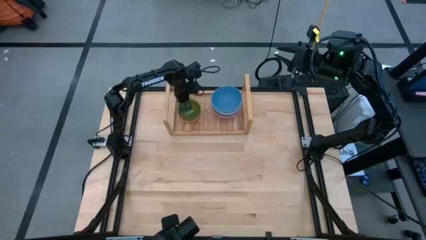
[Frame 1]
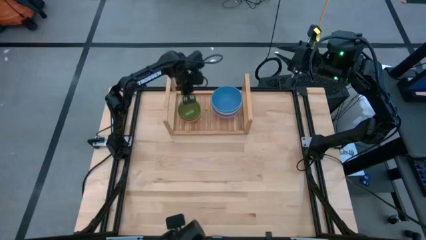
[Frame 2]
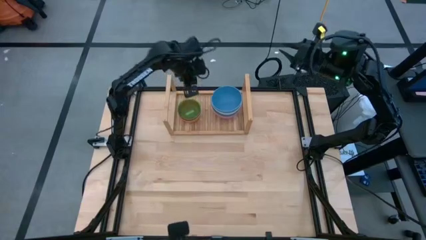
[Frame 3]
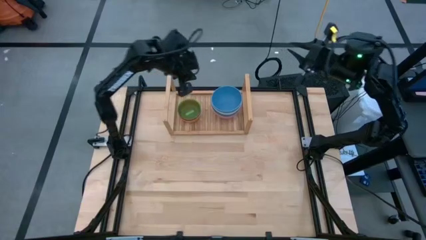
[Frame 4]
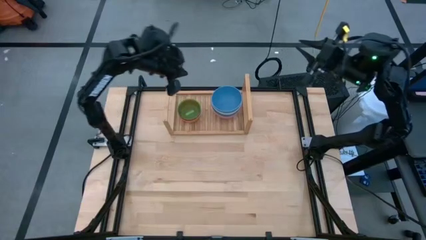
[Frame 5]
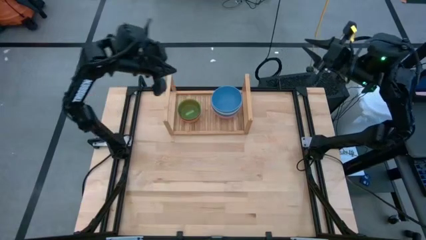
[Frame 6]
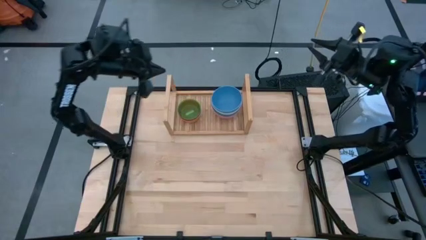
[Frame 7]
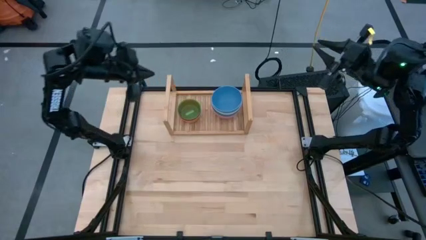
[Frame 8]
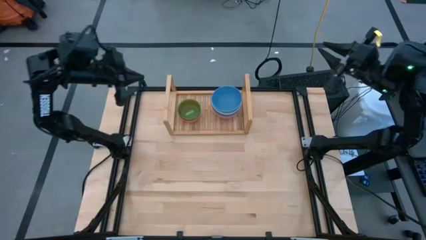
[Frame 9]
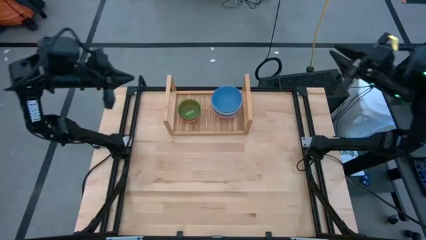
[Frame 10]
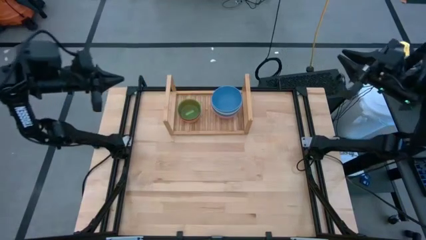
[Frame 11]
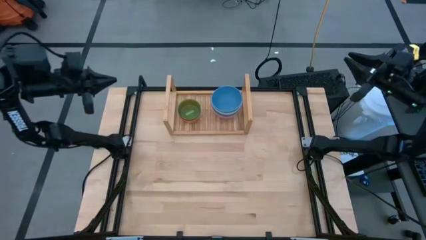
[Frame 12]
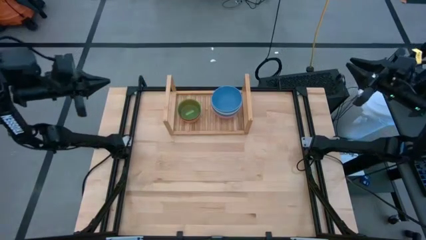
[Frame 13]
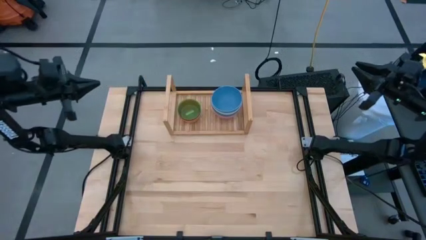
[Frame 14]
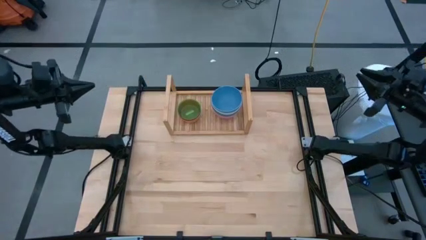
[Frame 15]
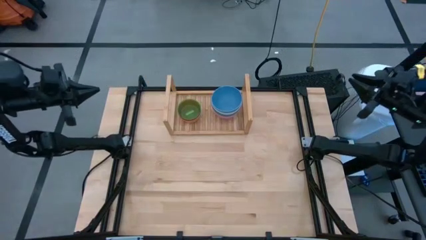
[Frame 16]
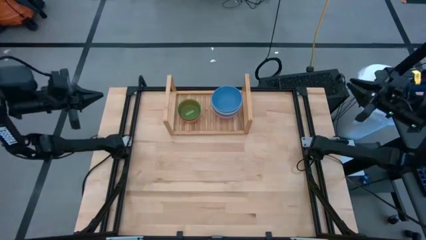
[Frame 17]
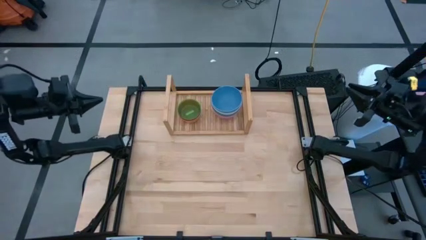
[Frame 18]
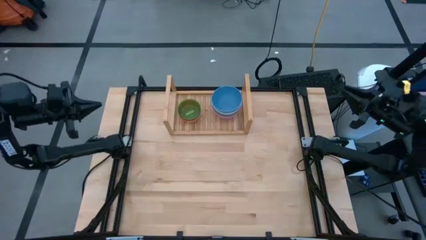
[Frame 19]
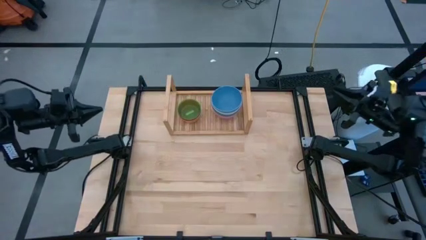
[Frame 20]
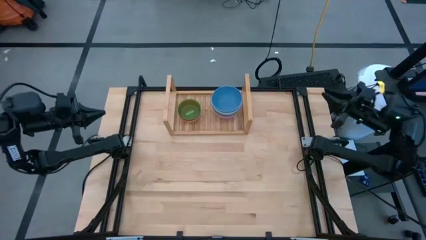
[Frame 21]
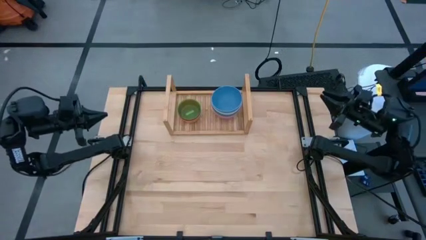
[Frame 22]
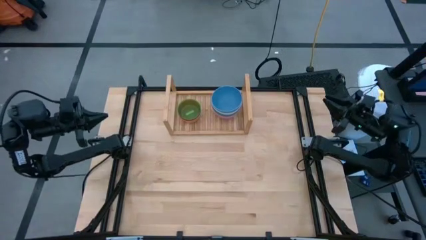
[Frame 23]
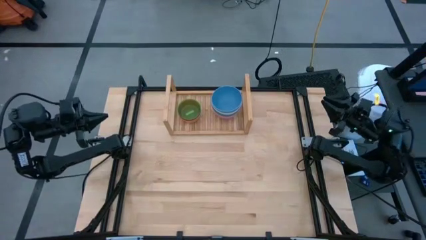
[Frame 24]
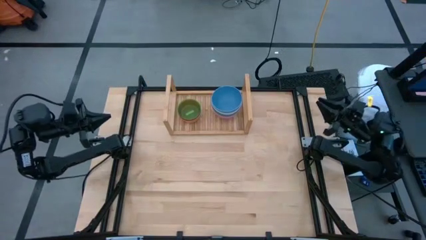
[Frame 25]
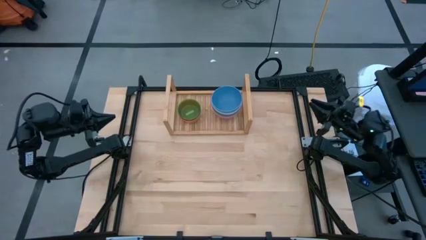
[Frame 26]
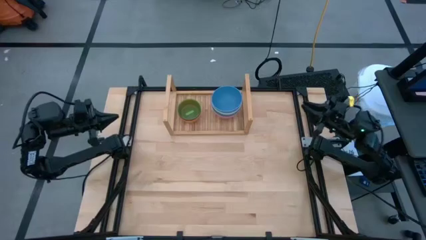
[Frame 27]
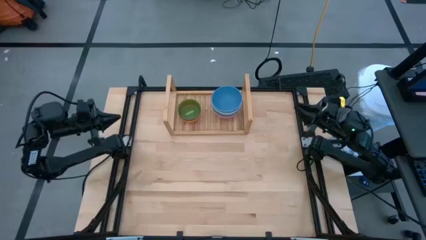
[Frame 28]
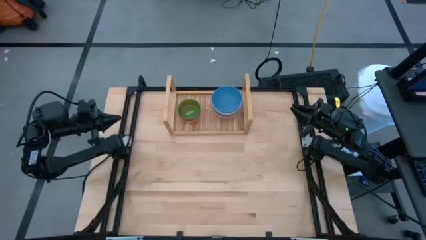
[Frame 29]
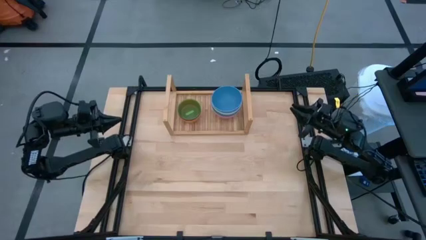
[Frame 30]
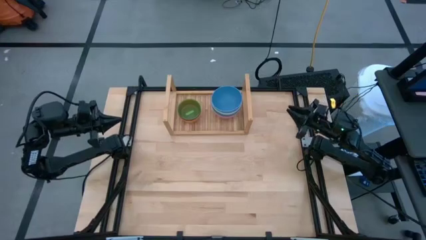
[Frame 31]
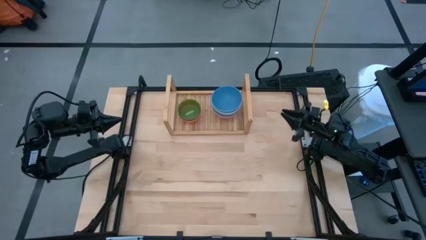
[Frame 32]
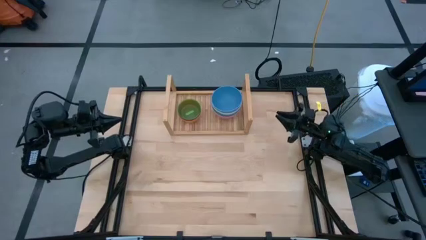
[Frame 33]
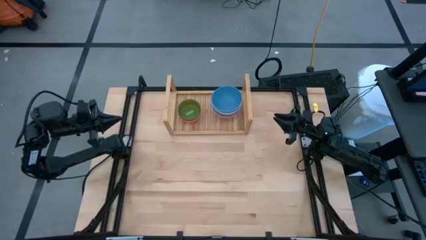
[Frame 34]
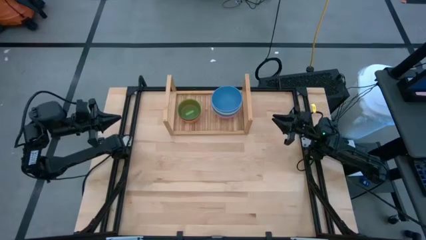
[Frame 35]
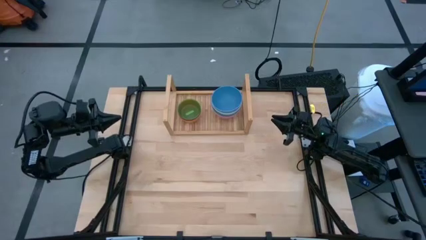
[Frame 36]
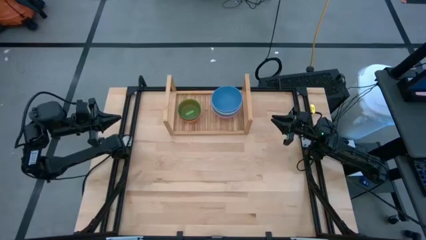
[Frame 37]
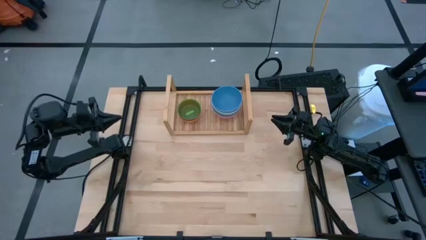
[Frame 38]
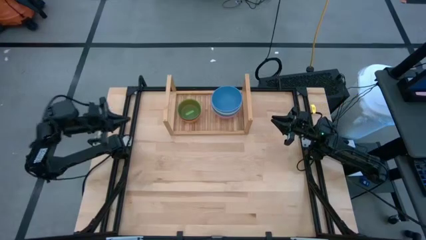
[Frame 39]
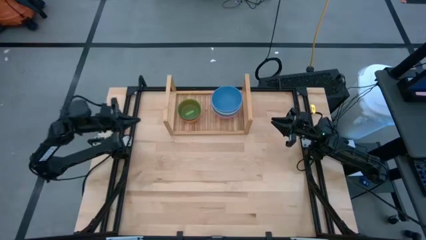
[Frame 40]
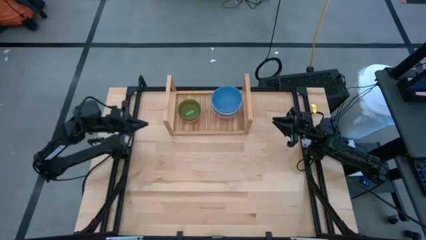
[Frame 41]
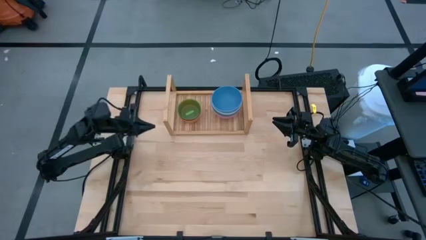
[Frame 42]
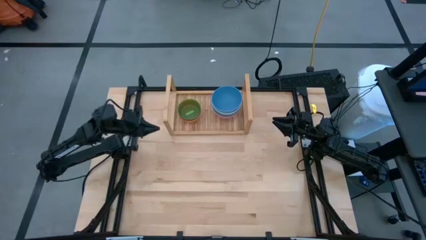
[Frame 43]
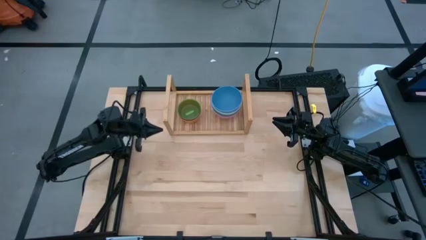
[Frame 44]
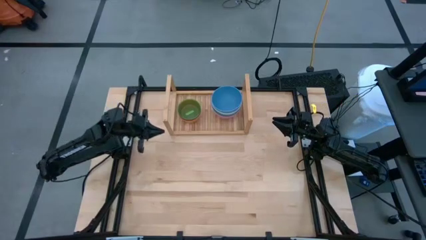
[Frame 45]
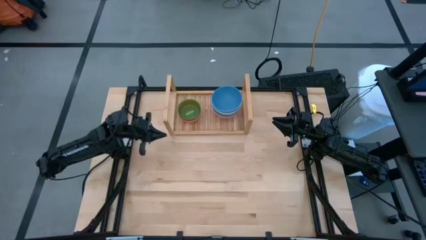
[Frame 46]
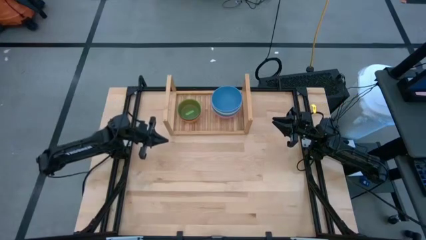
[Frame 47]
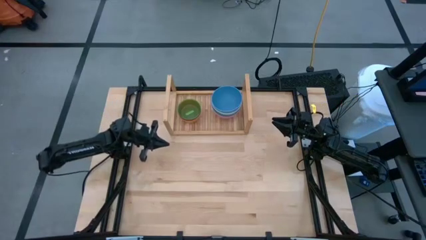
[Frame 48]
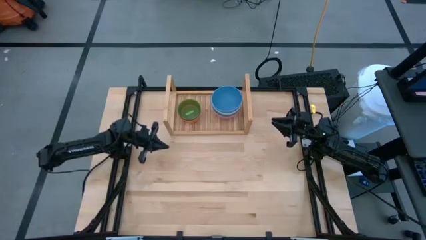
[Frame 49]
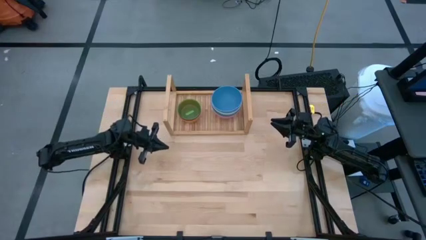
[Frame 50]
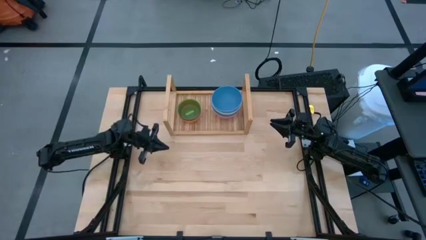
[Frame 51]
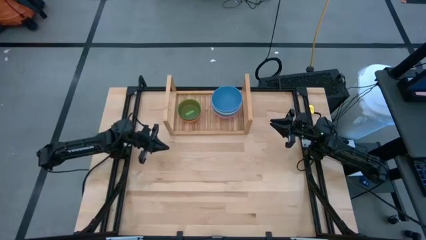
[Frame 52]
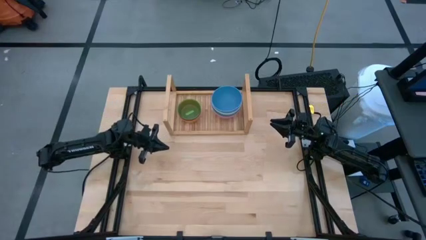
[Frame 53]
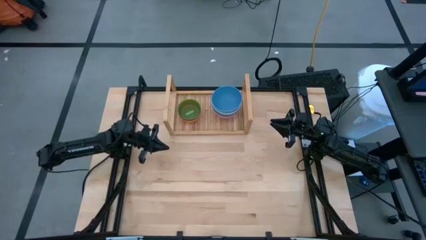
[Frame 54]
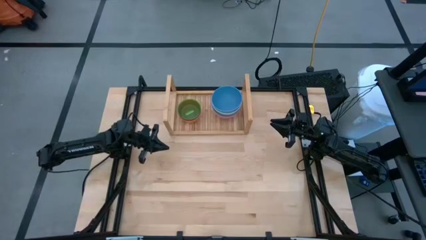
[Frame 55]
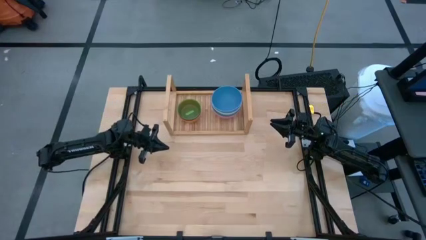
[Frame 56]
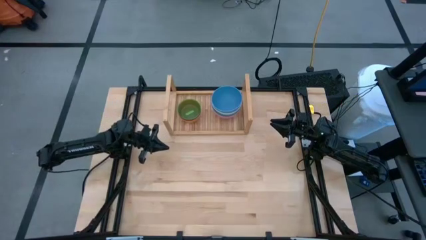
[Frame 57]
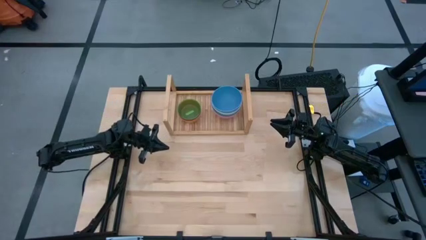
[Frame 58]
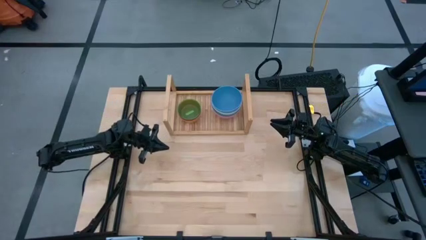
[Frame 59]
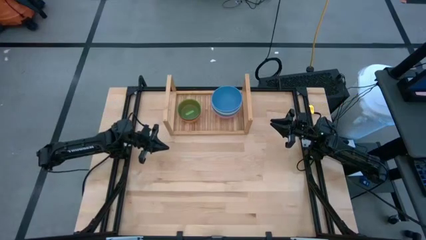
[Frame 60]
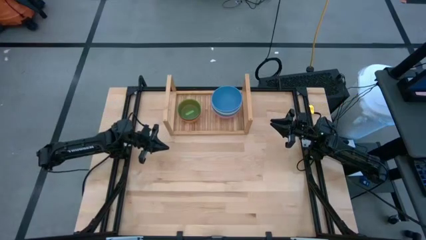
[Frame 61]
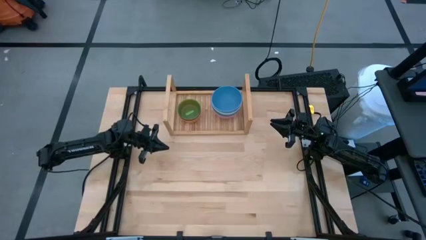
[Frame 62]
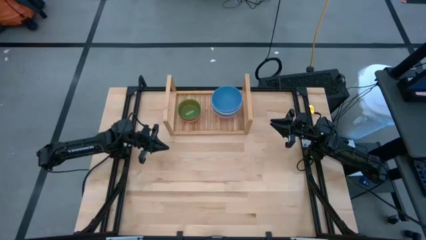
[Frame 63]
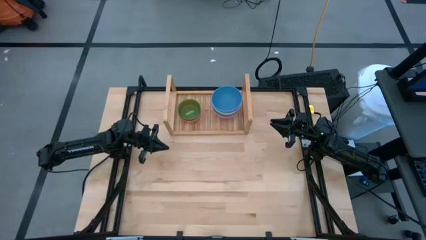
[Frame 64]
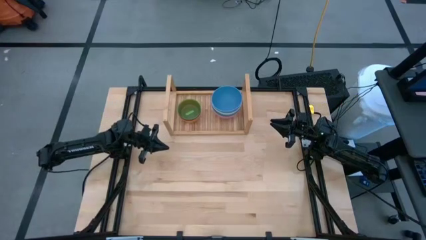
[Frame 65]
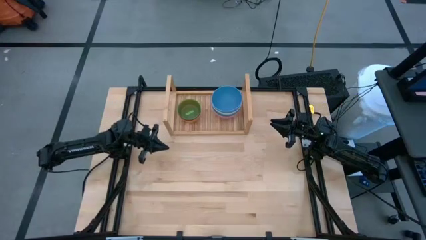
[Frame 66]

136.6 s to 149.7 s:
Task: Place and stack bowls onto a shelf
Return to Home Position

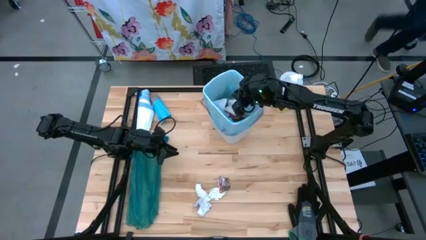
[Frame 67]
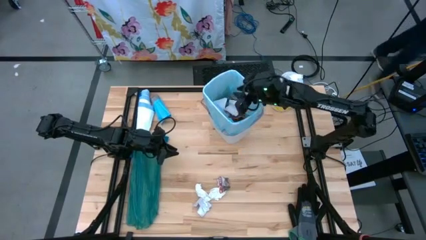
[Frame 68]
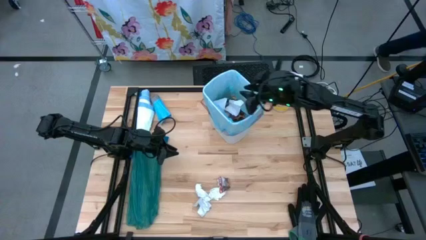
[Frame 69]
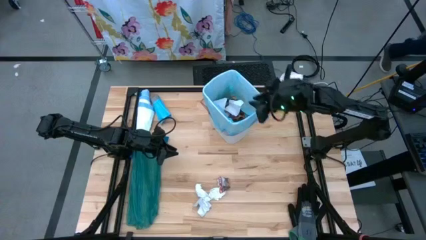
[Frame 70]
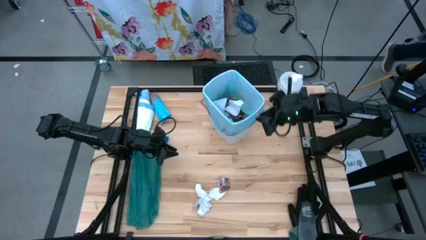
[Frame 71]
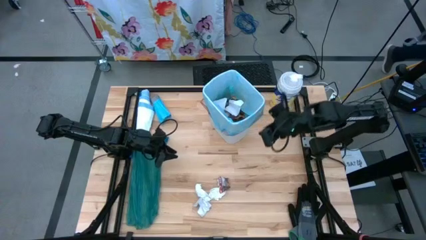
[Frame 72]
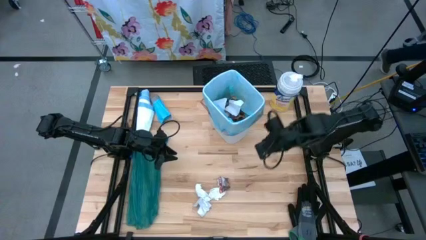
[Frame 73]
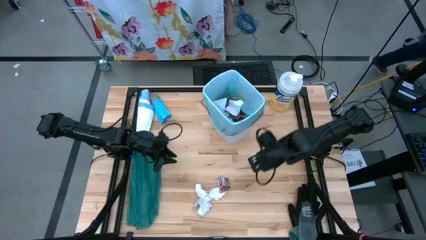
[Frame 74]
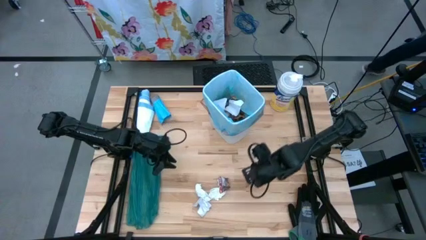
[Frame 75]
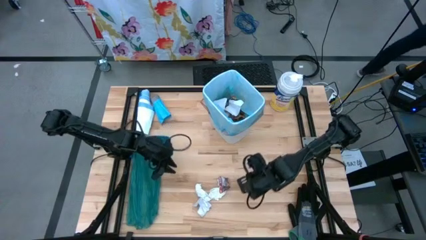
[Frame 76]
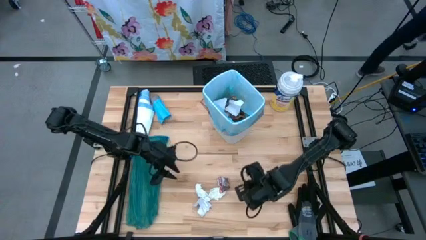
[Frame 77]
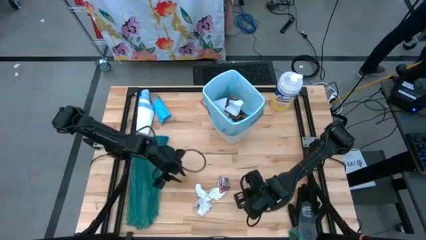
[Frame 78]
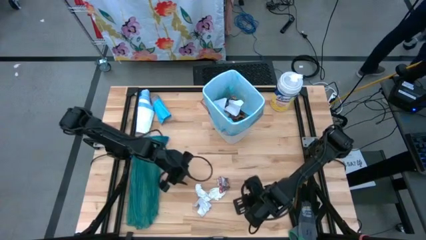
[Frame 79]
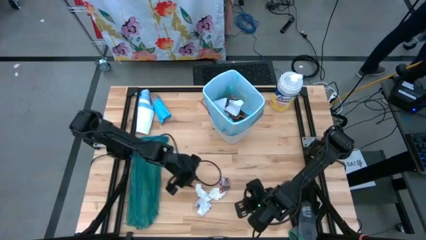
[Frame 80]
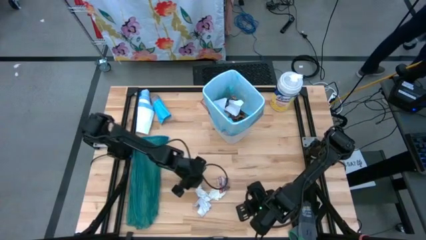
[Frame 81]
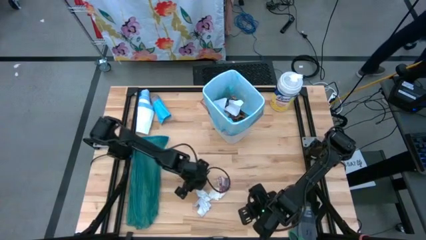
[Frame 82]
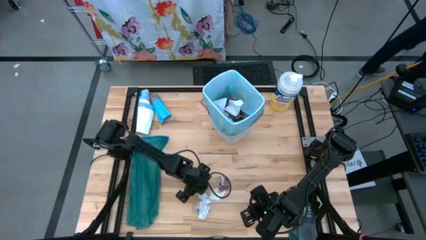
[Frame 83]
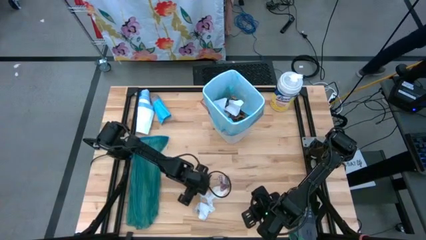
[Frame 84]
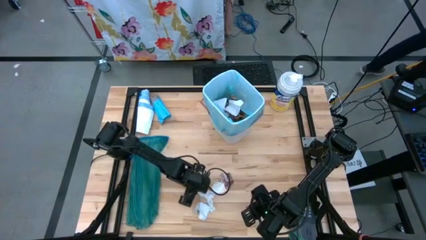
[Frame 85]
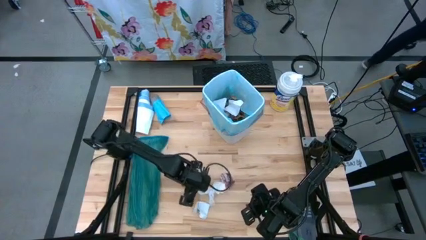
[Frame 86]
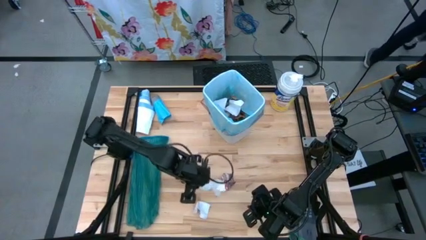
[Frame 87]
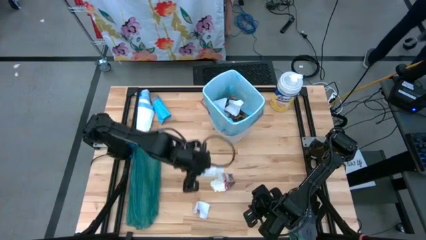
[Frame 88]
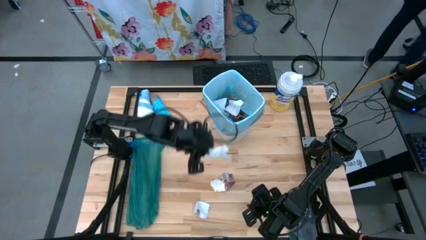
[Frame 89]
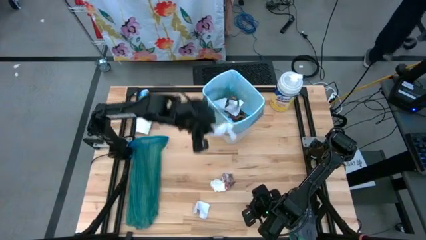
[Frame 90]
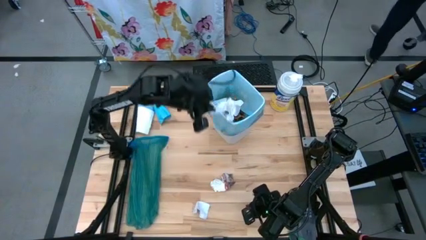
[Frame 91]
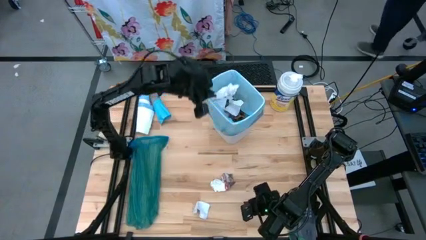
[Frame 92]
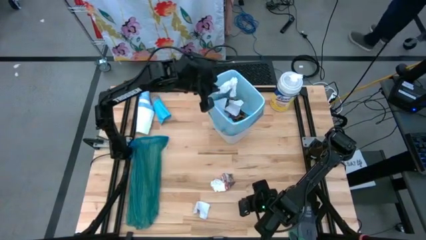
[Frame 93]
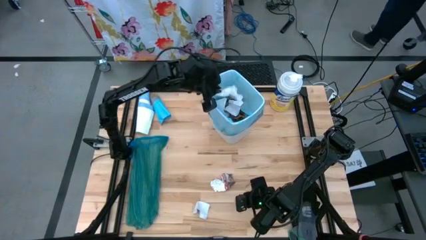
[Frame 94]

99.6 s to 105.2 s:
Task: place trash/remove bag and relplace
Put the white paper into the trash bin
